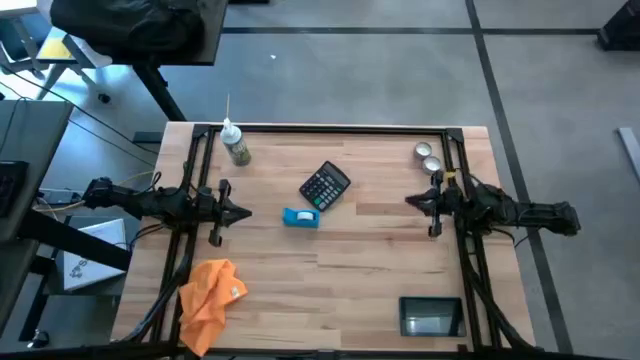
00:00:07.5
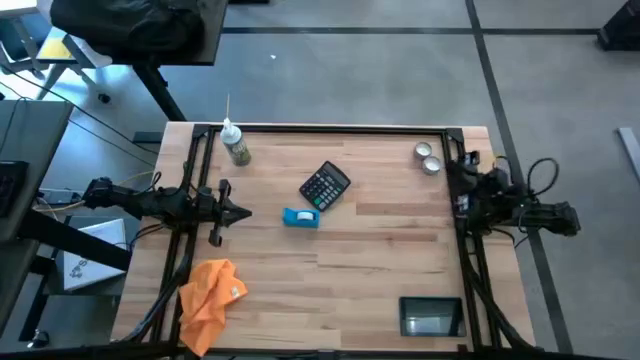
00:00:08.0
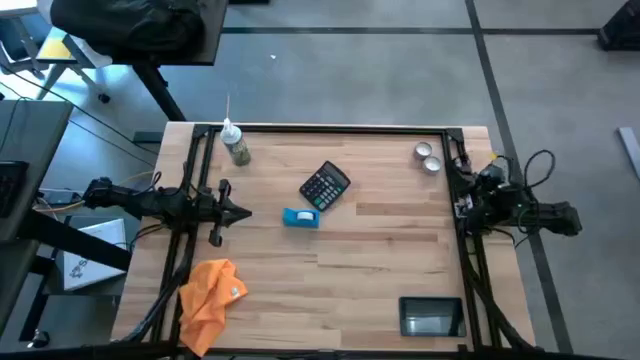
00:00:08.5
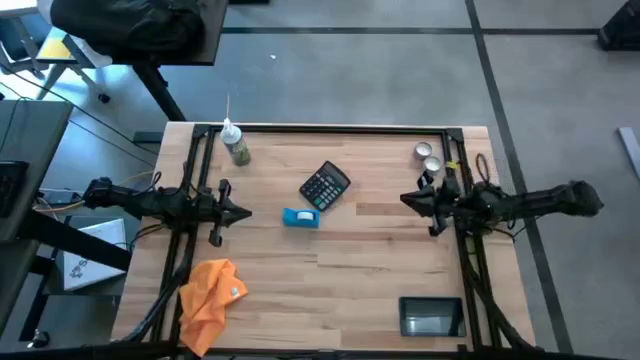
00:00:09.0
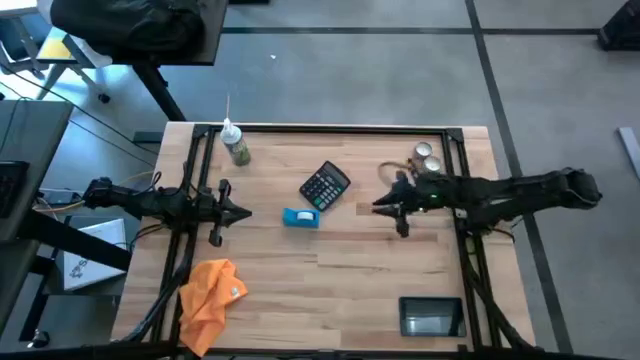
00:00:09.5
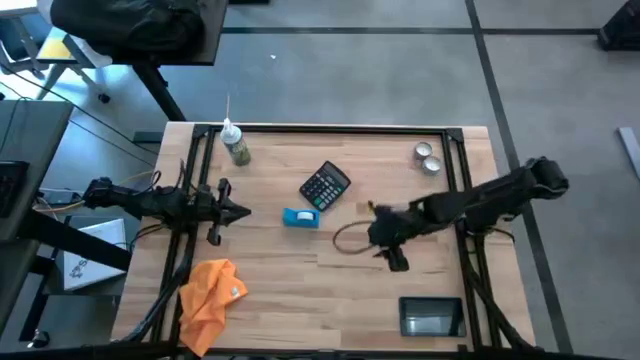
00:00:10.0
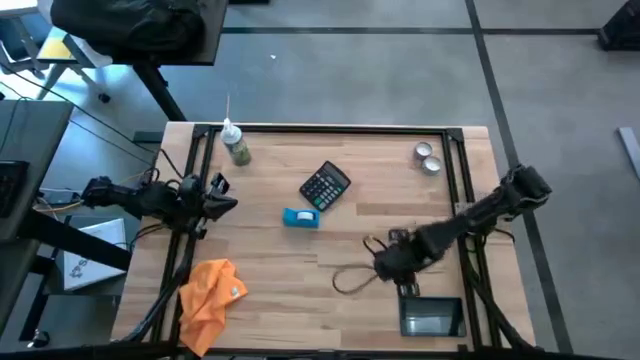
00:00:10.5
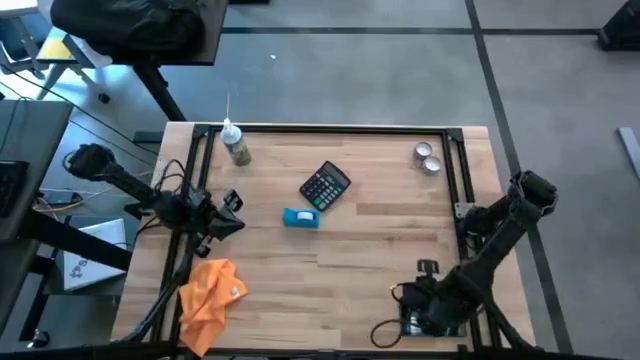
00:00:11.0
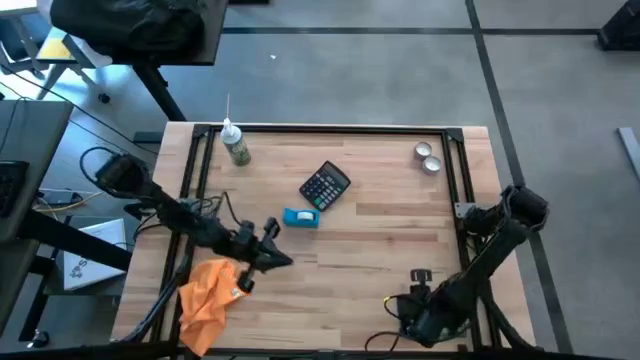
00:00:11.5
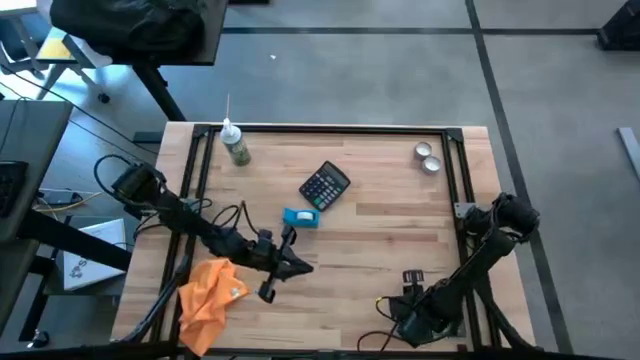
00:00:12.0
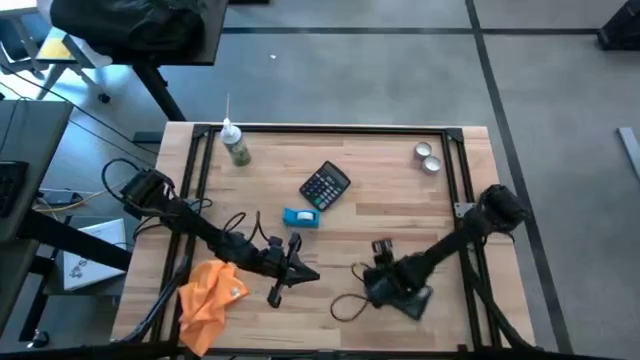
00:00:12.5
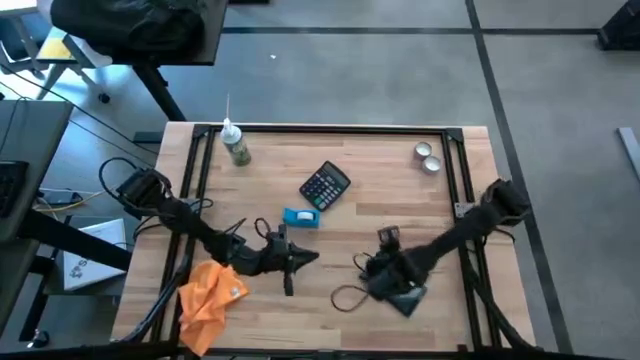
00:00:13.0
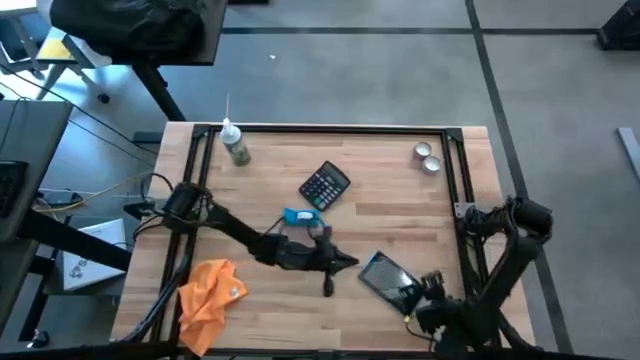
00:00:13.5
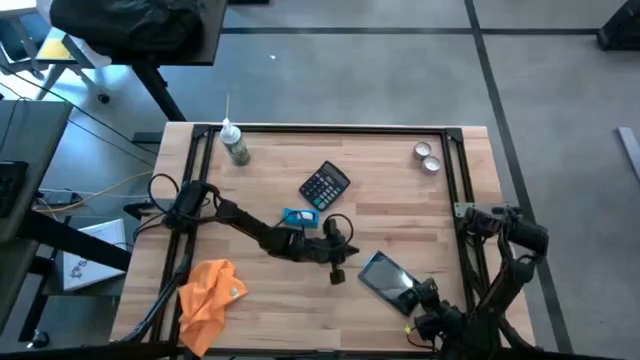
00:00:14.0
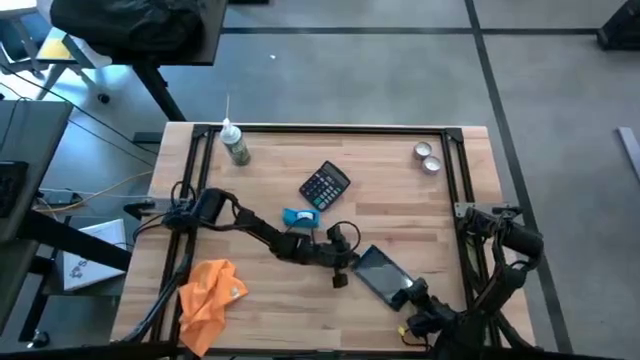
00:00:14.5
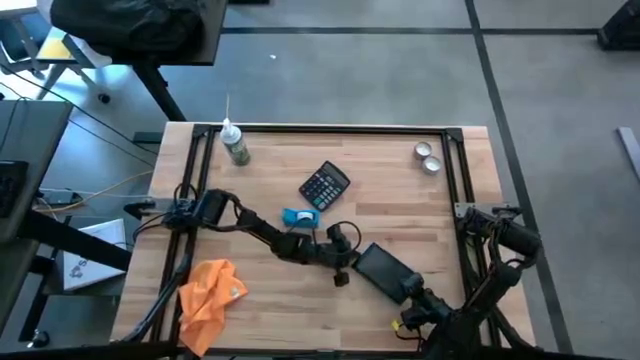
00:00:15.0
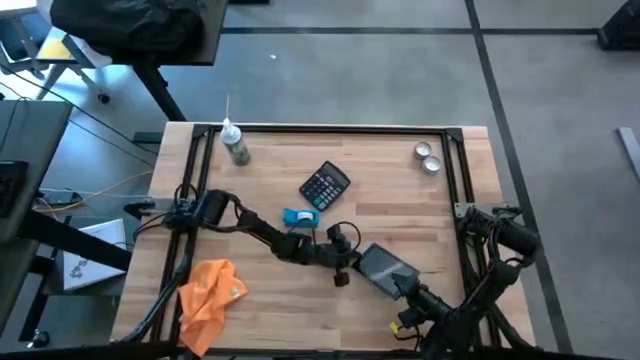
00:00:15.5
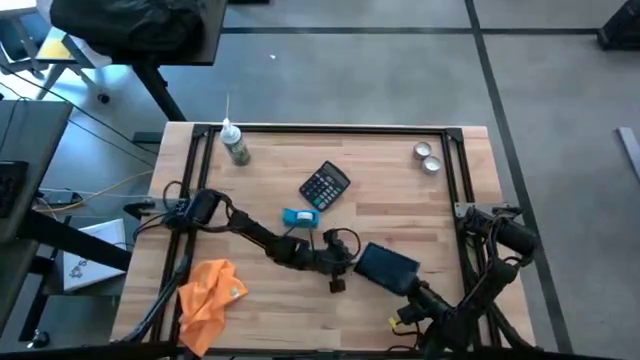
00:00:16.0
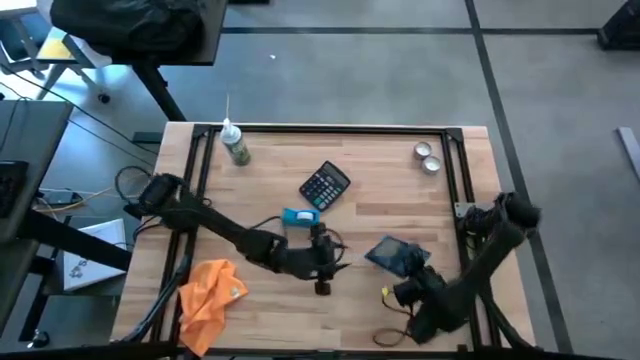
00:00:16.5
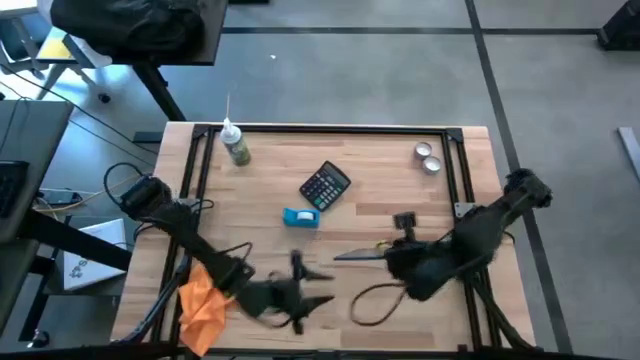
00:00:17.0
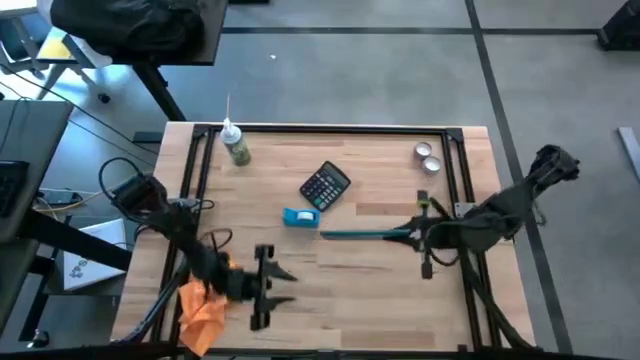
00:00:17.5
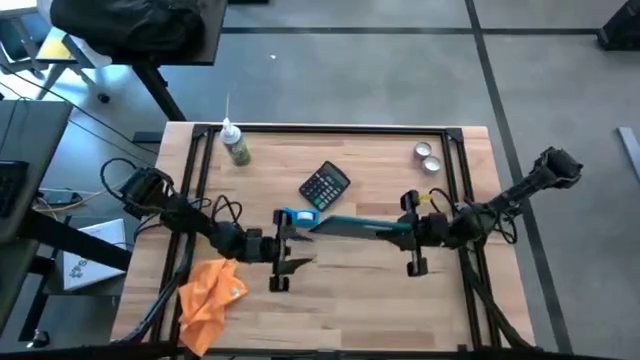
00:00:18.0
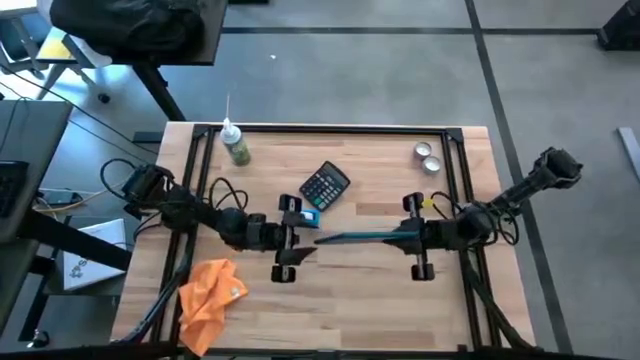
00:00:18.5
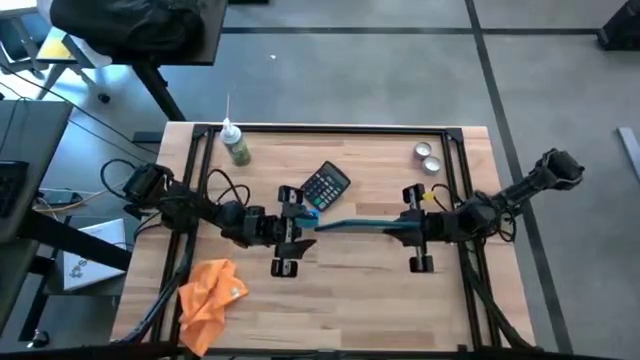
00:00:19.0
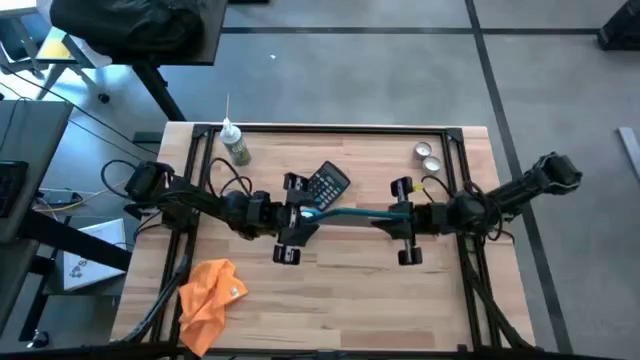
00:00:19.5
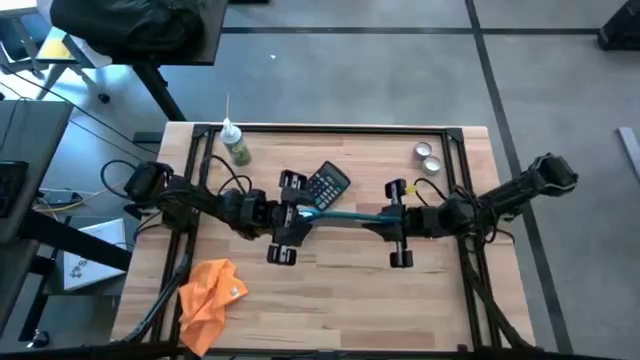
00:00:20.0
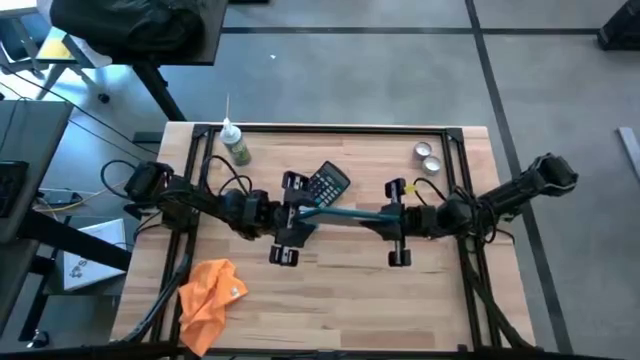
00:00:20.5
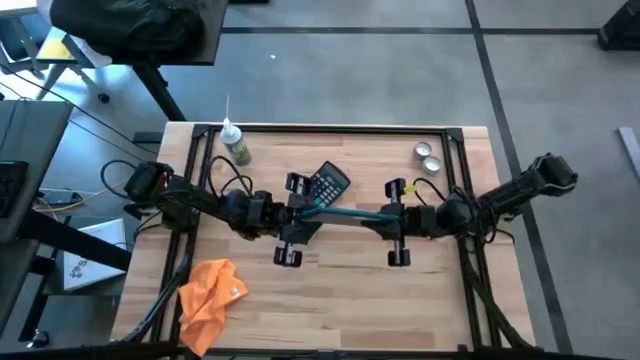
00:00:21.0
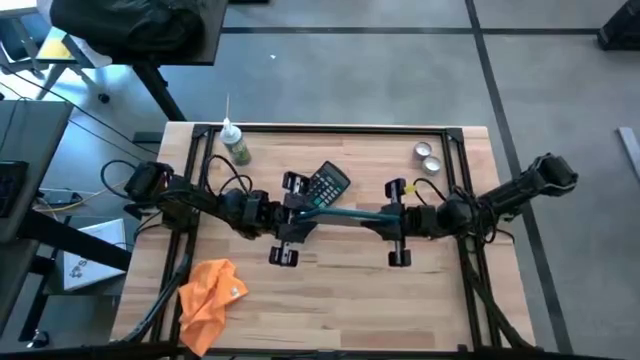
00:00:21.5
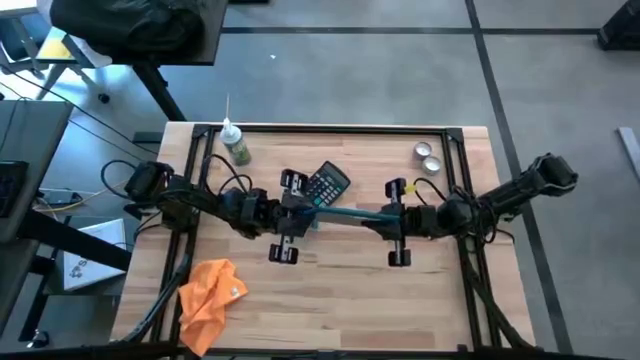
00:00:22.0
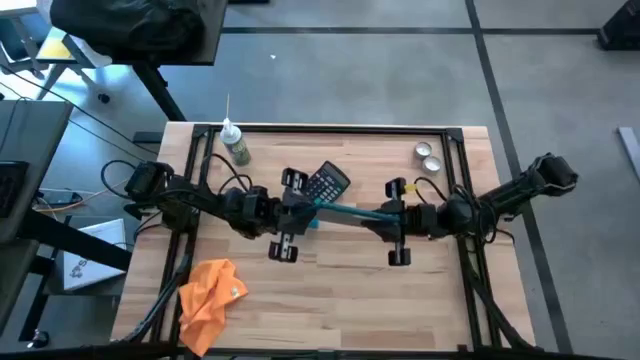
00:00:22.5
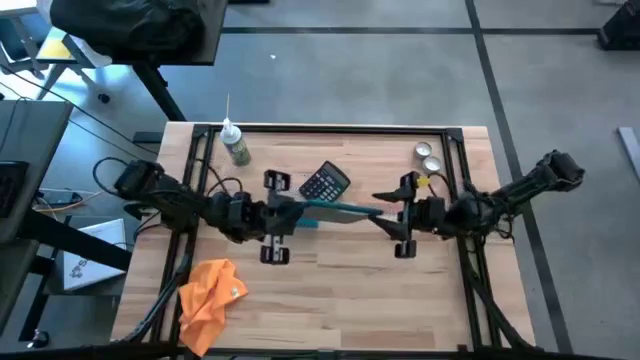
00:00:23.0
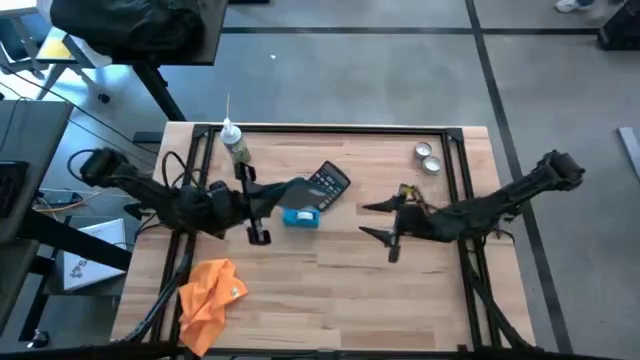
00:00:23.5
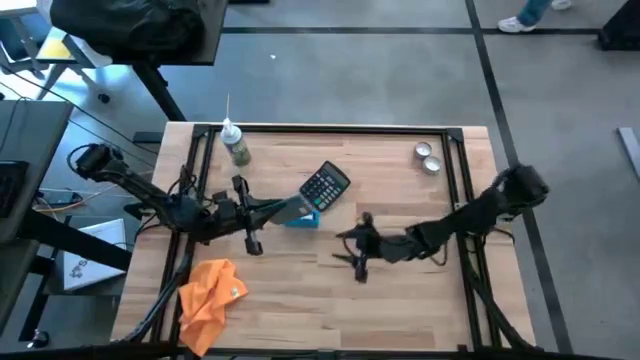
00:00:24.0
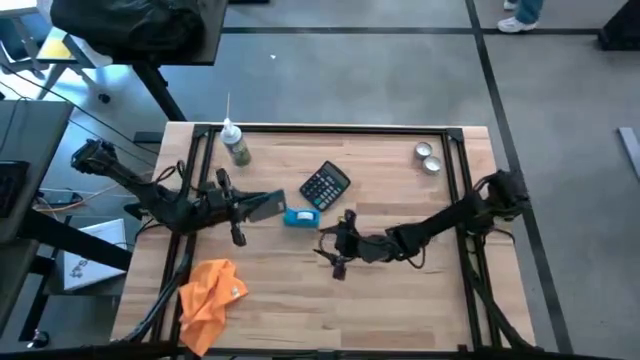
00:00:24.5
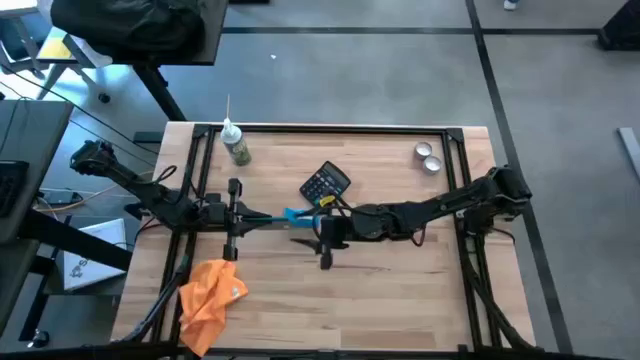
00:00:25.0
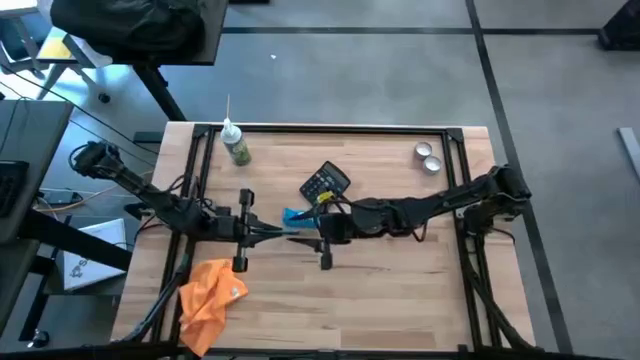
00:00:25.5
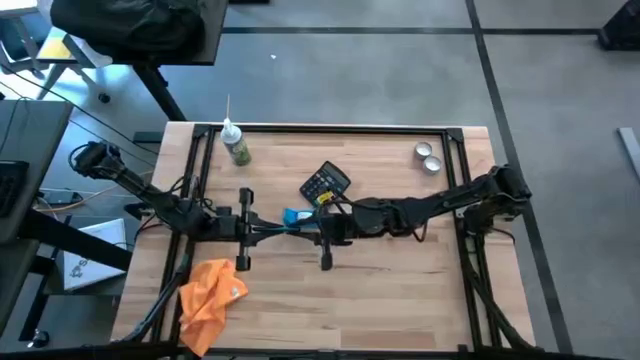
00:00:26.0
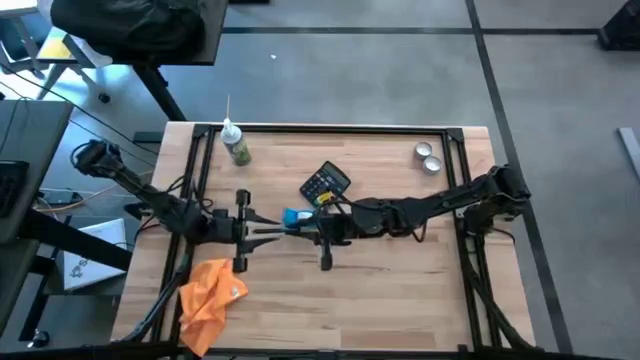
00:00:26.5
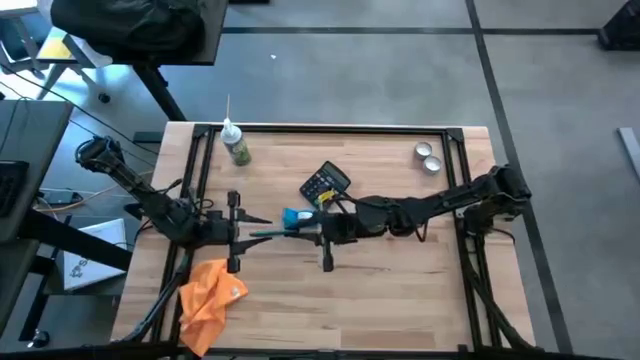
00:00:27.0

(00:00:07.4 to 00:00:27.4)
Task: Apply microfiber cloth
Spray the cellphone using the white spray bottle
